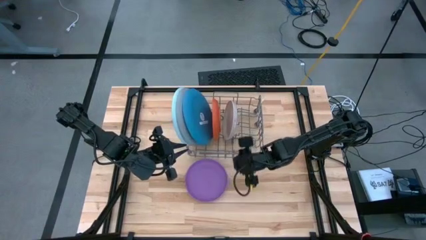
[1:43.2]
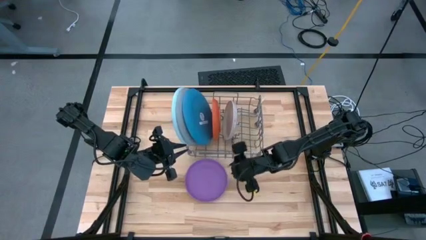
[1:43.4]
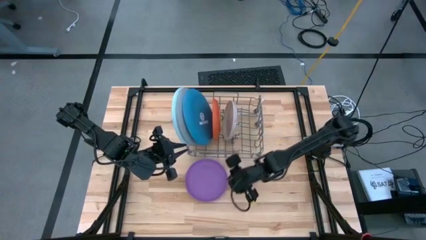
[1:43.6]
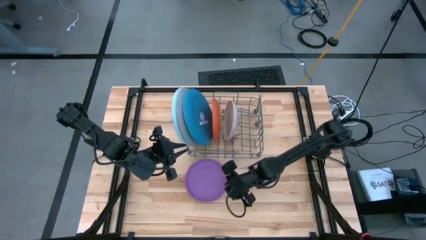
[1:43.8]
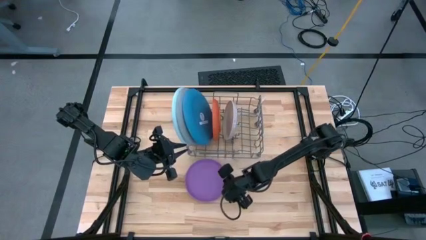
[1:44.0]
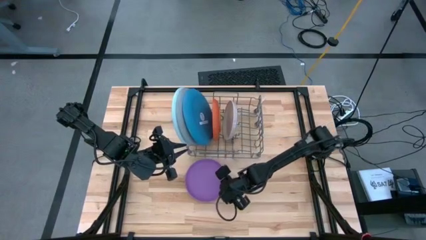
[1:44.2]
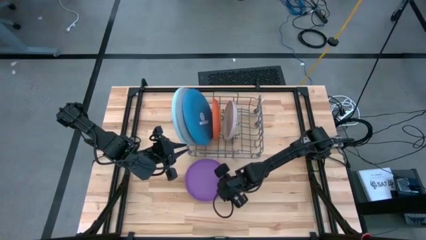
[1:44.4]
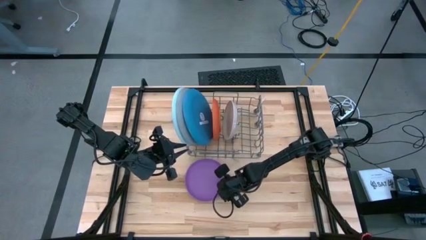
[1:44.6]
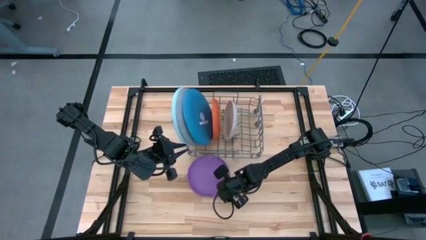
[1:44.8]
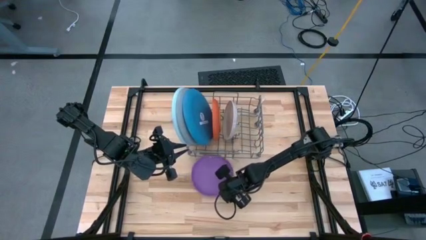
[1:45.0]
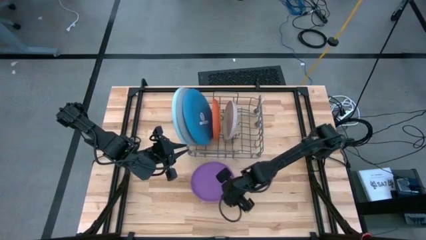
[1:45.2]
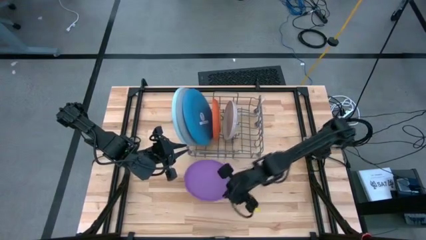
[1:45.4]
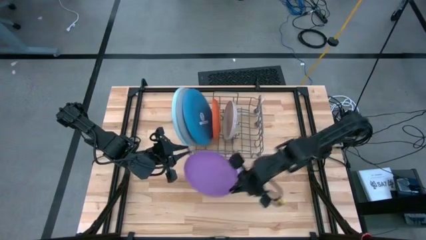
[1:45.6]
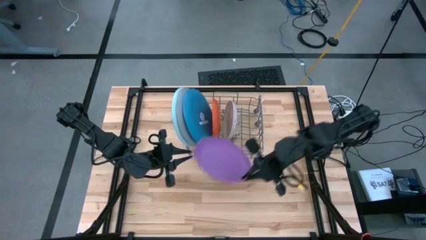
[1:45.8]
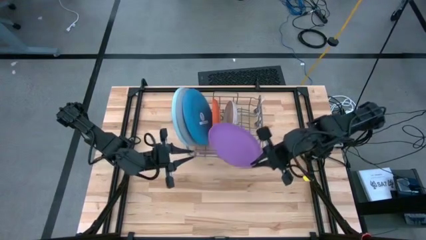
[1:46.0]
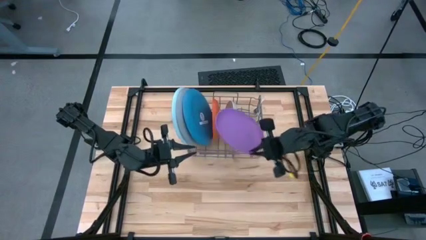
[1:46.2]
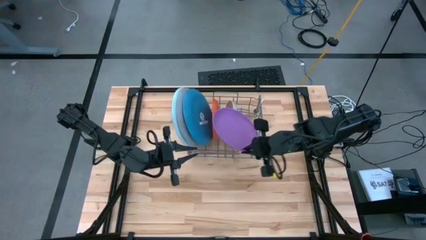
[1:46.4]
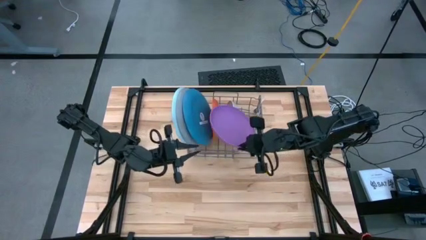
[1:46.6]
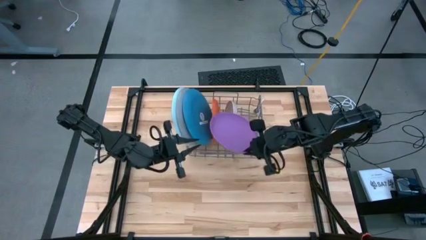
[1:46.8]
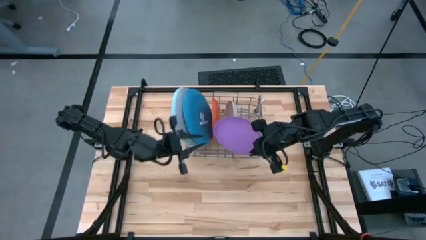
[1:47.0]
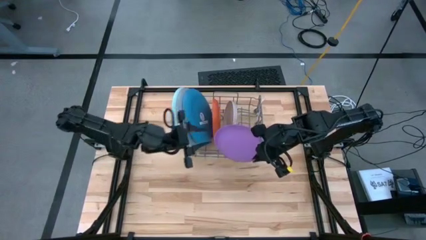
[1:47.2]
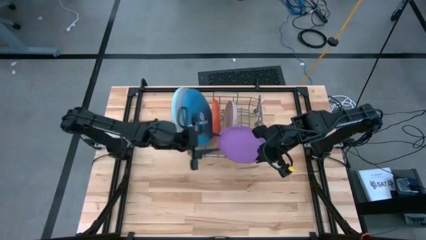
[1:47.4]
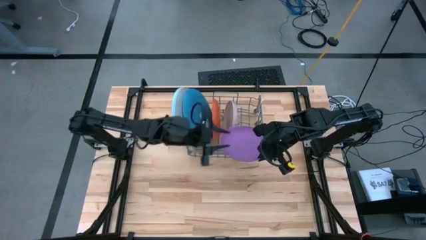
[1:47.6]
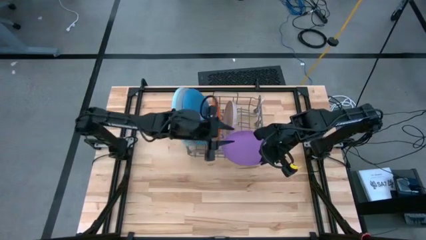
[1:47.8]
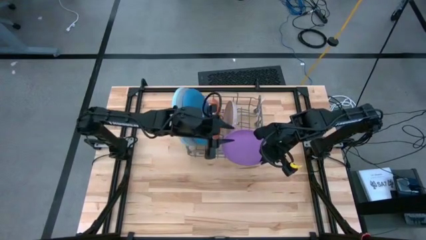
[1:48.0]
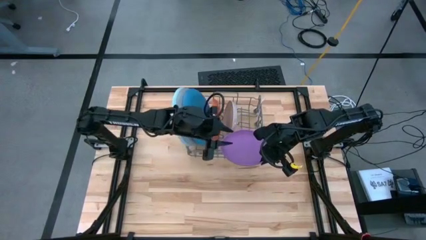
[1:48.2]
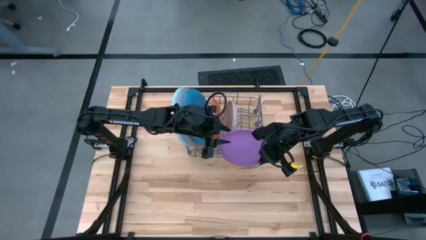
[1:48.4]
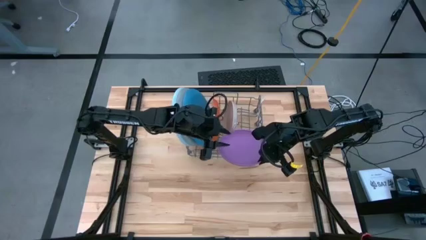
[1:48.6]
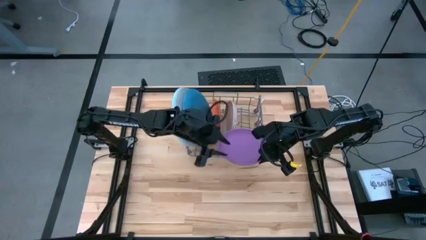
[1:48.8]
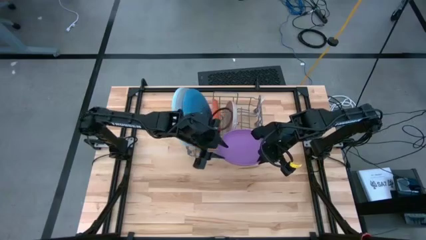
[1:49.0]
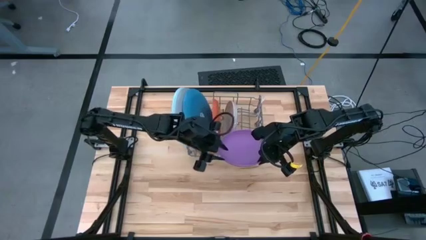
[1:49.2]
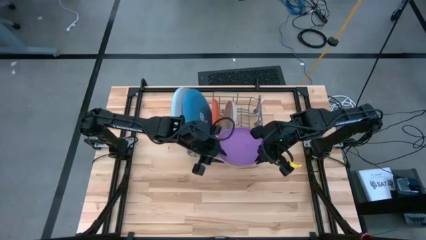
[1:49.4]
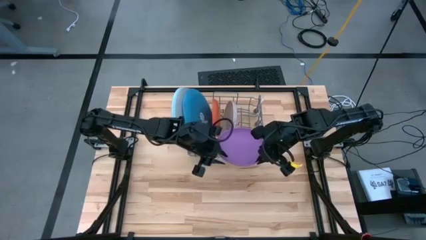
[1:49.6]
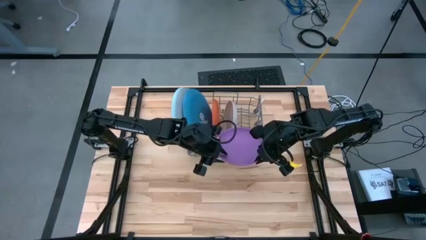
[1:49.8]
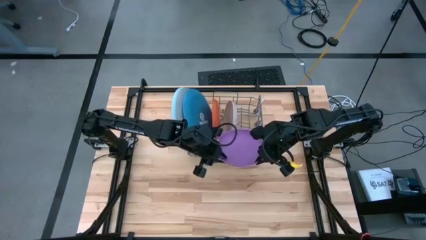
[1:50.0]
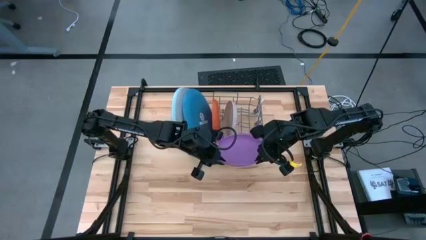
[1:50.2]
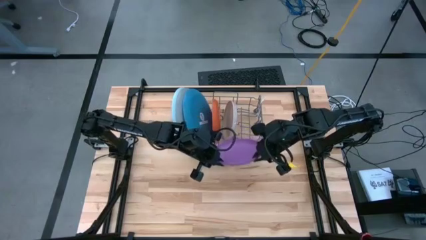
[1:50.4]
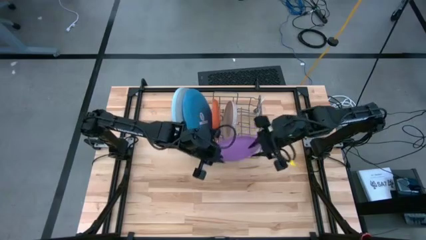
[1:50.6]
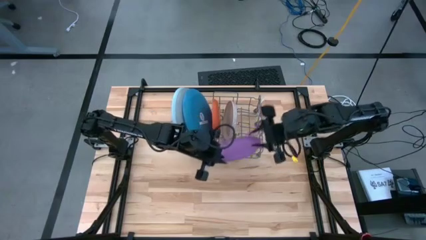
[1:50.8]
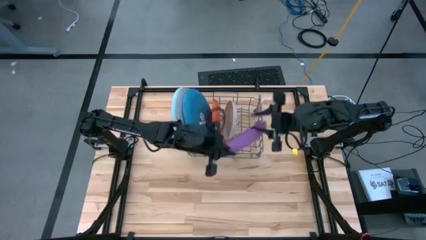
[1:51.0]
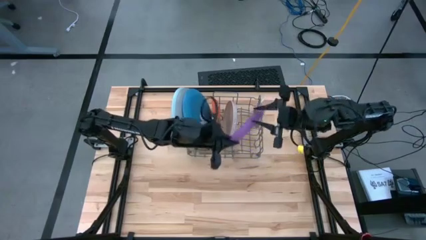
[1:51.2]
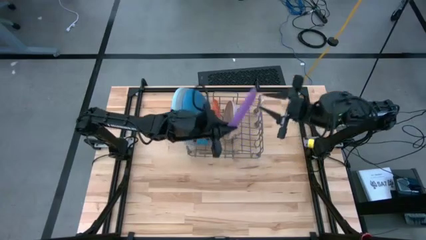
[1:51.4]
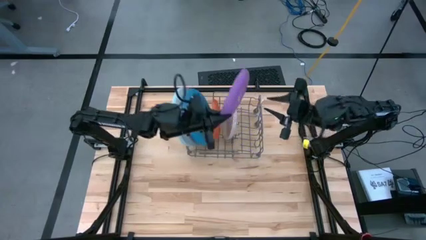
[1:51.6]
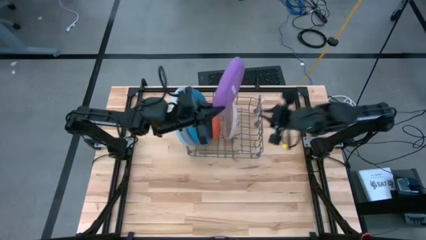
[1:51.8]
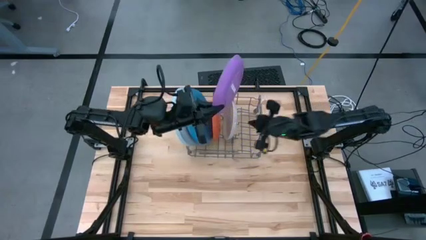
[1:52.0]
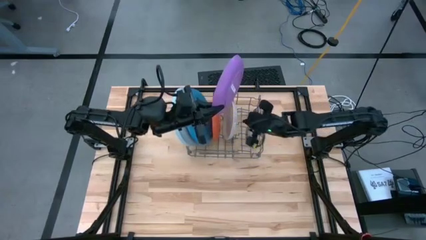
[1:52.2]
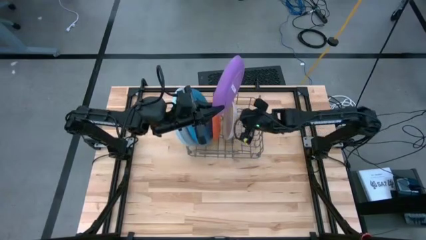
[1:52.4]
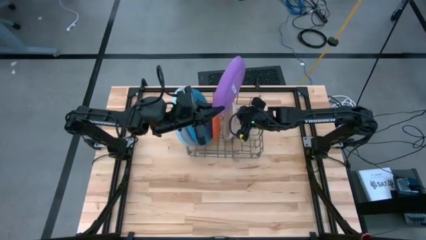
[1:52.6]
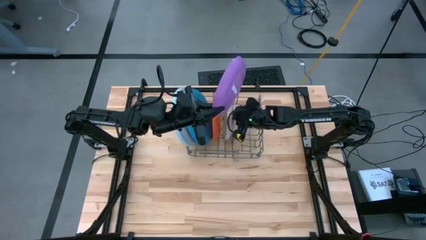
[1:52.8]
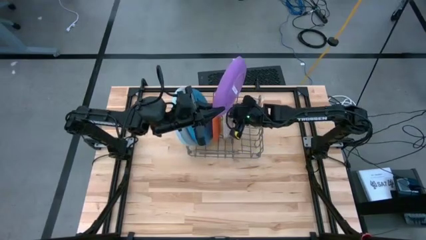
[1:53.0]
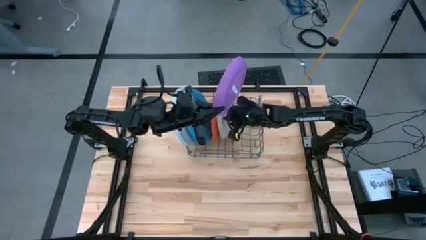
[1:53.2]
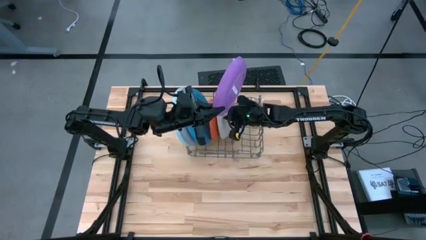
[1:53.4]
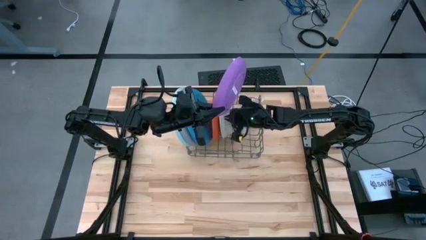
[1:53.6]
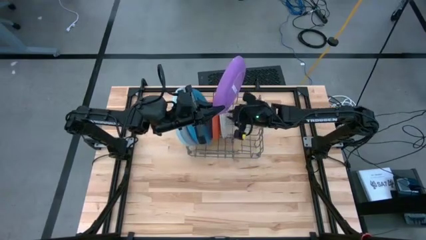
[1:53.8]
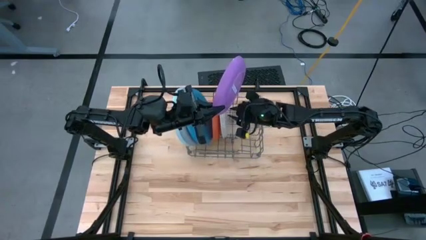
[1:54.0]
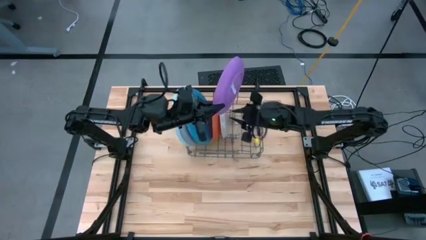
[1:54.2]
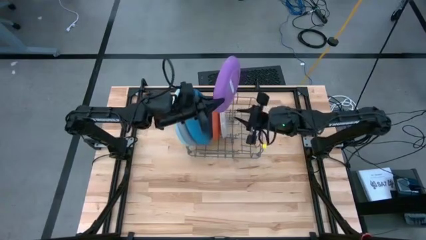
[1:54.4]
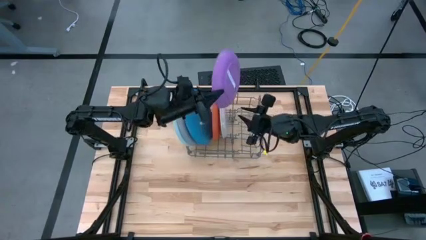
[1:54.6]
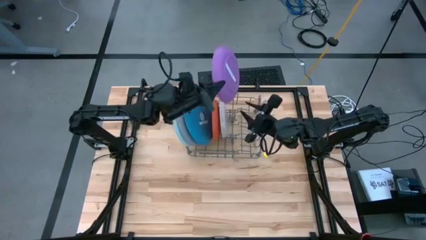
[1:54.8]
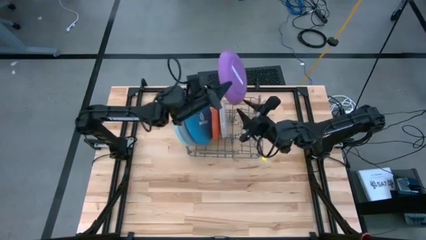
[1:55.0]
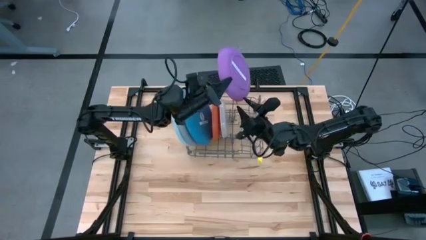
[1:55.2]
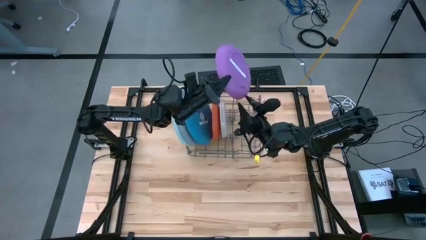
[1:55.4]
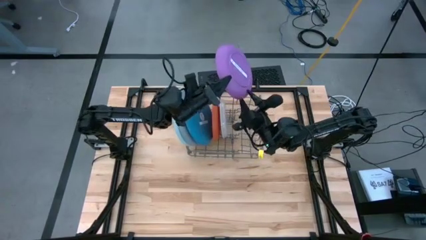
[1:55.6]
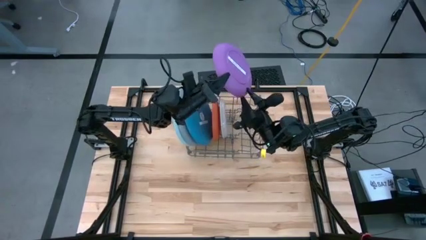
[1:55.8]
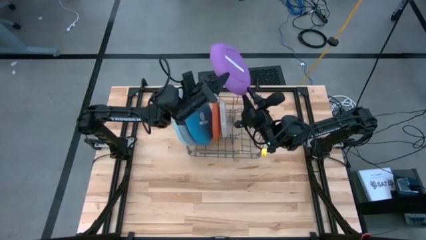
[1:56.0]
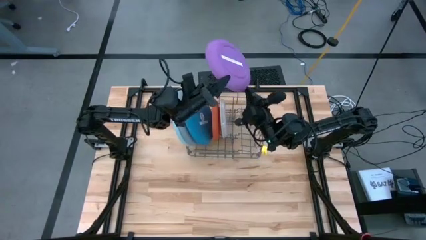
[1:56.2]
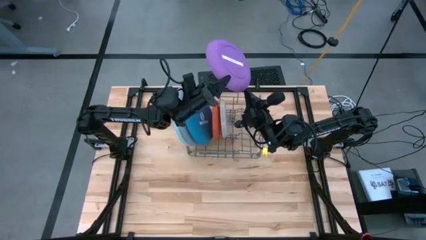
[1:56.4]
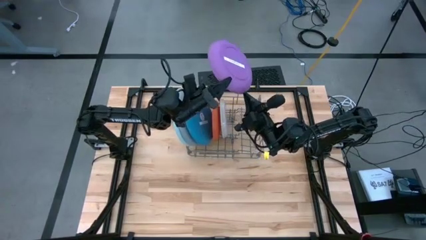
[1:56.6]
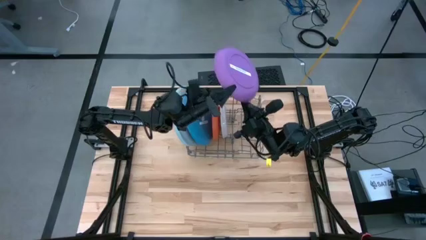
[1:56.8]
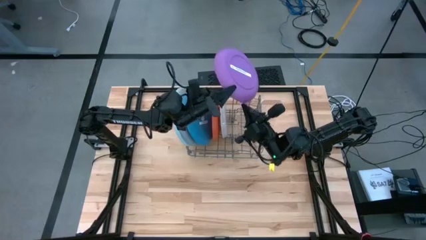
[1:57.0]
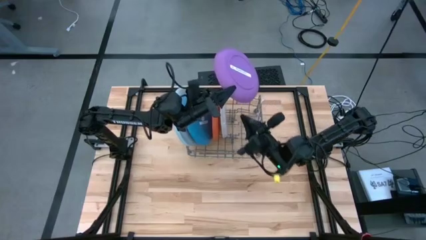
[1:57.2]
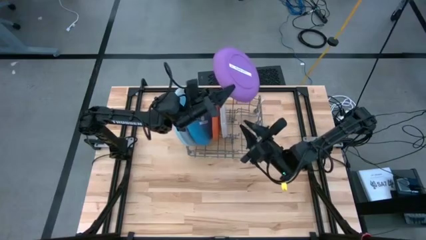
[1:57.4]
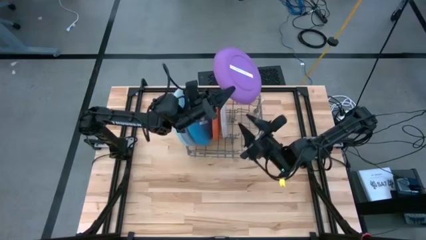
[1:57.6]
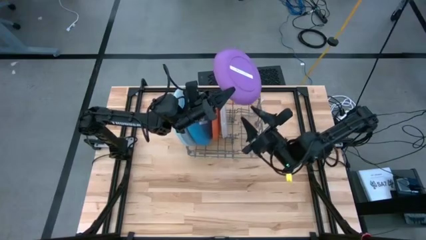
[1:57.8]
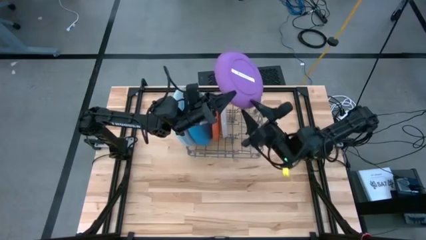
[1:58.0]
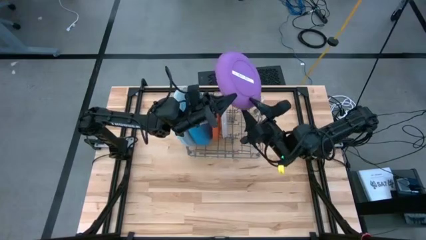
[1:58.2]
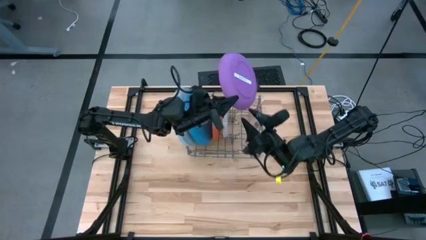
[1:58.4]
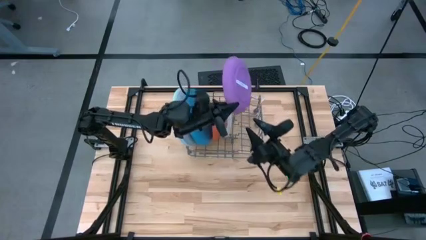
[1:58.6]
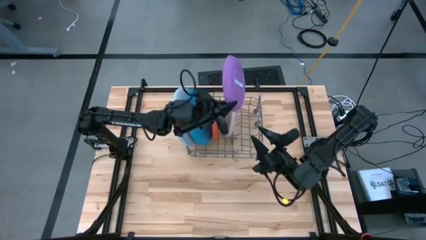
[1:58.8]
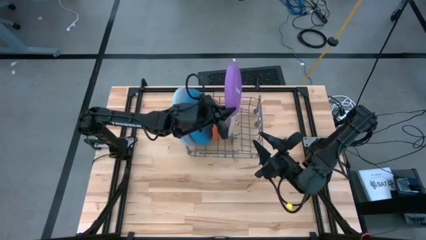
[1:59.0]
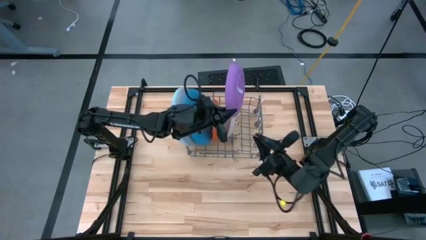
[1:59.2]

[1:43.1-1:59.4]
Task: Sort dishes
Put the violet plate into the dish rack
